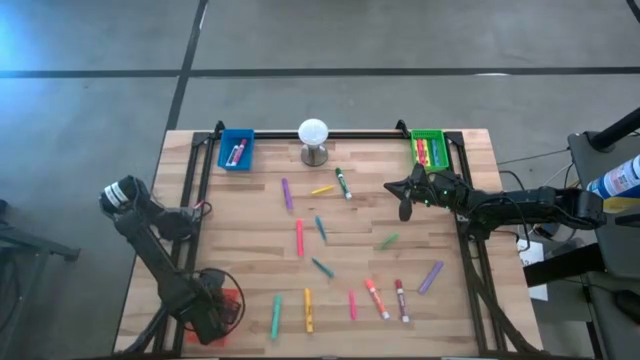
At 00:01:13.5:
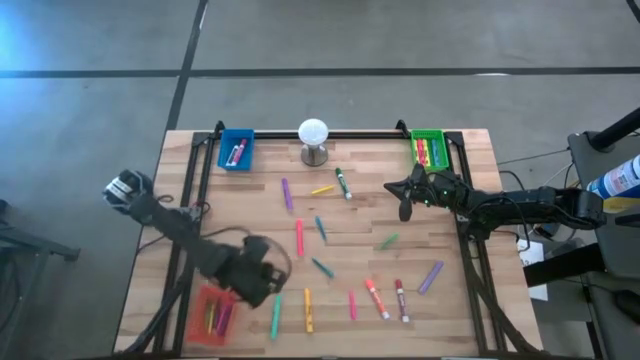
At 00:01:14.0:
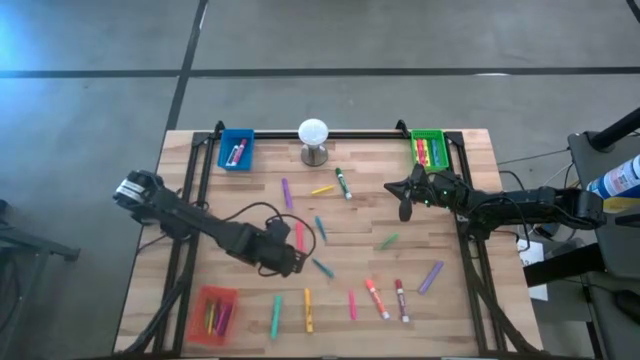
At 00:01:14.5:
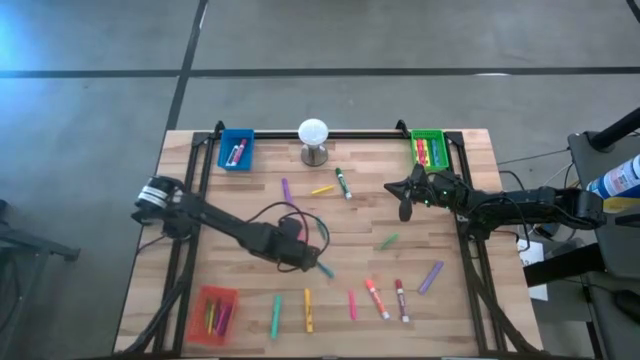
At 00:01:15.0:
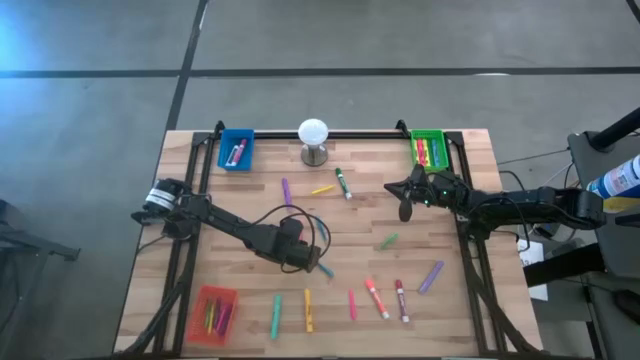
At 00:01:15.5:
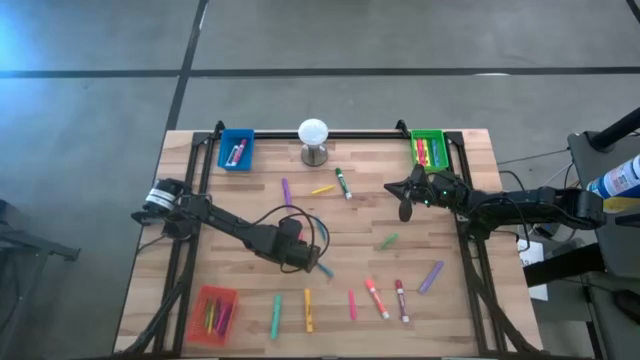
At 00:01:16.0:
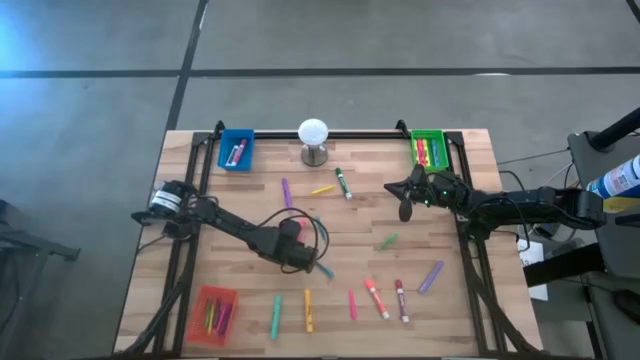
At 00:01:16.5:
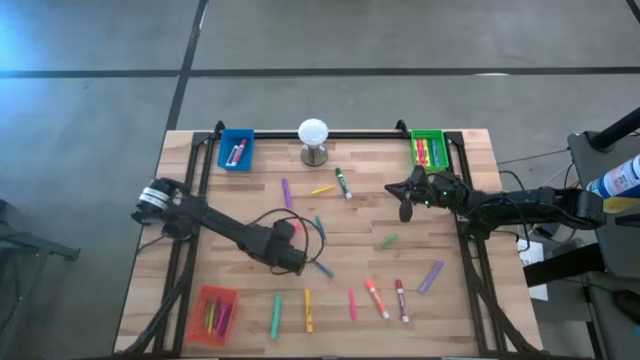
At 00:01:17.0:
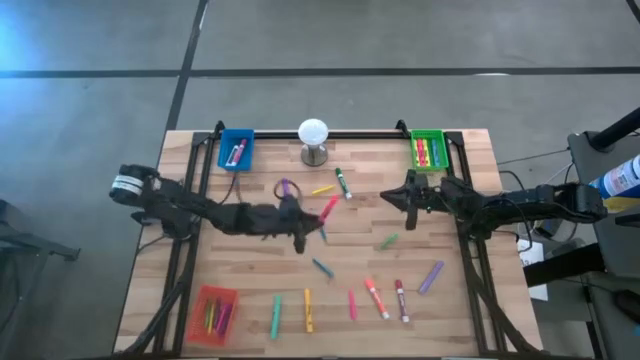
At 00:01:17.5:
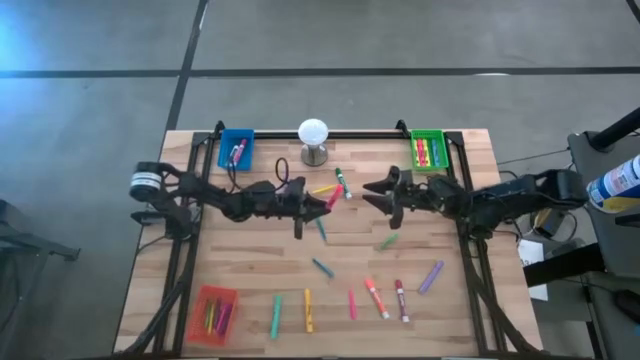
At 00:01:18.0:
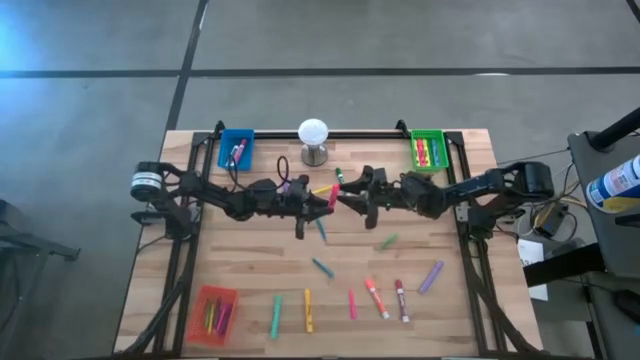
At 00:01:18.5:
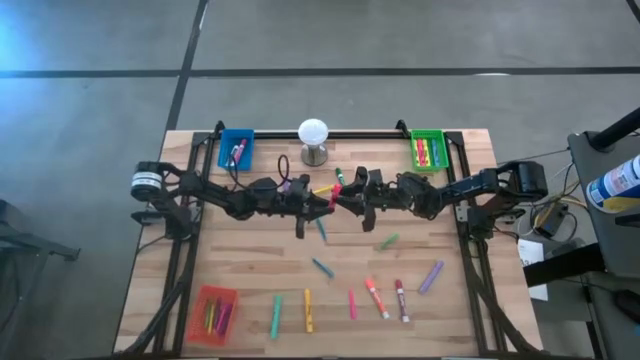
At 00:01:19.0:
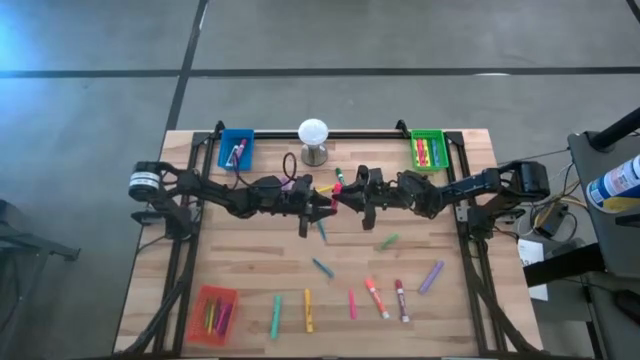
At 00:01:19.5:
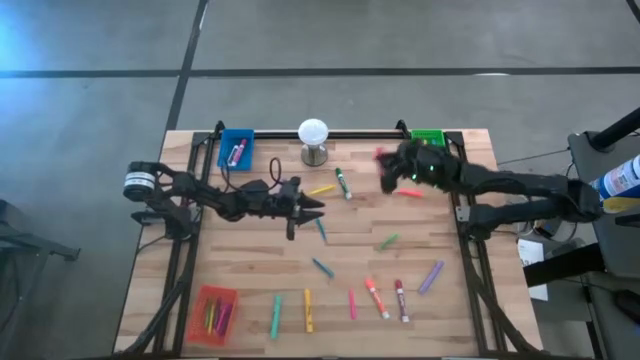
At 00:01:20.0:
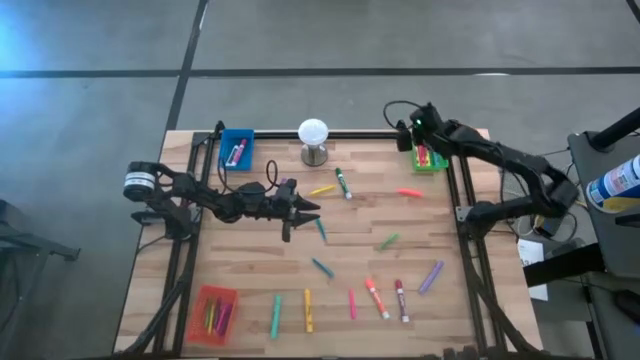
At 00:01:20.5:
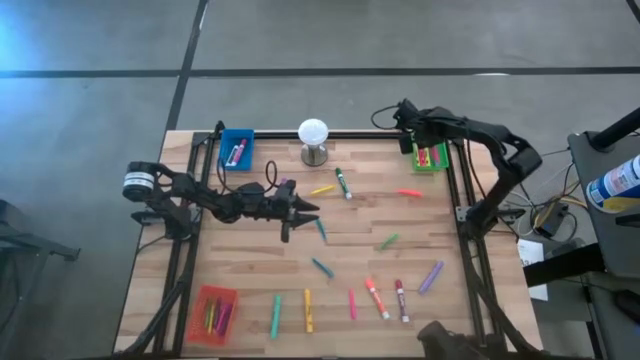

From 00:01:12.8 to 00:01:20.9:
Task: Pick & Place Markers
Put the pink highlighter pen into the green bin

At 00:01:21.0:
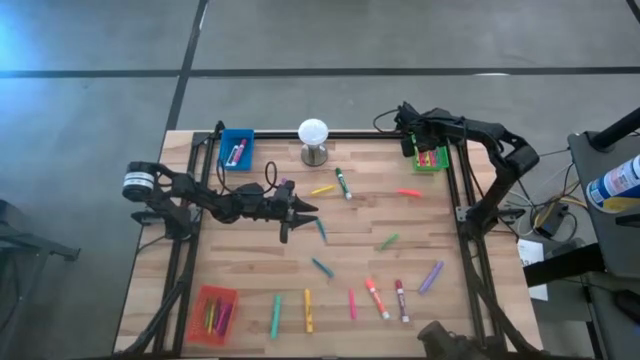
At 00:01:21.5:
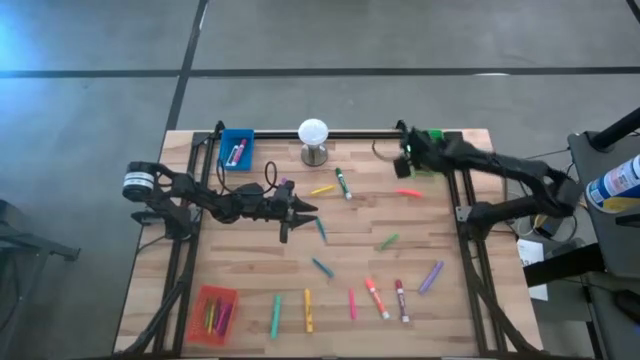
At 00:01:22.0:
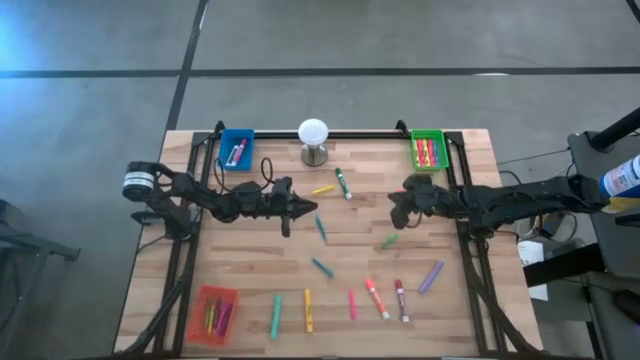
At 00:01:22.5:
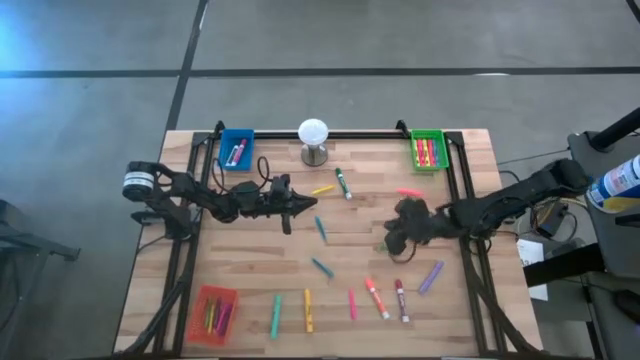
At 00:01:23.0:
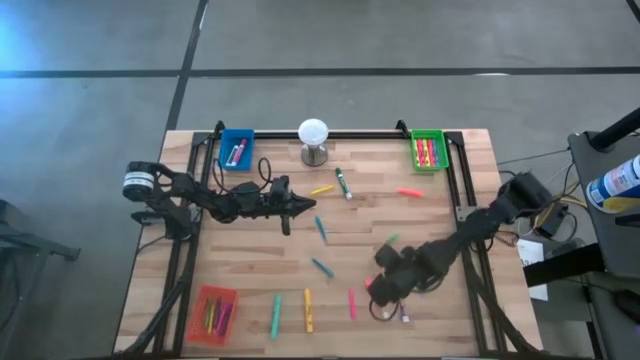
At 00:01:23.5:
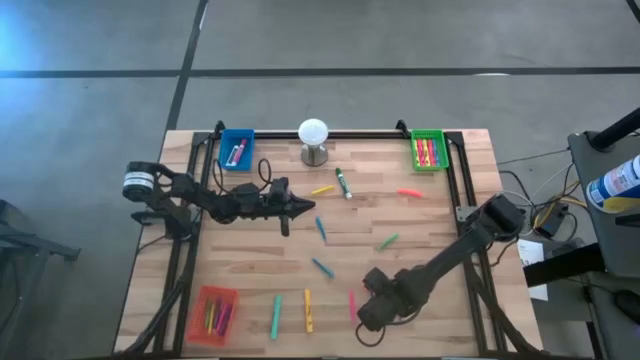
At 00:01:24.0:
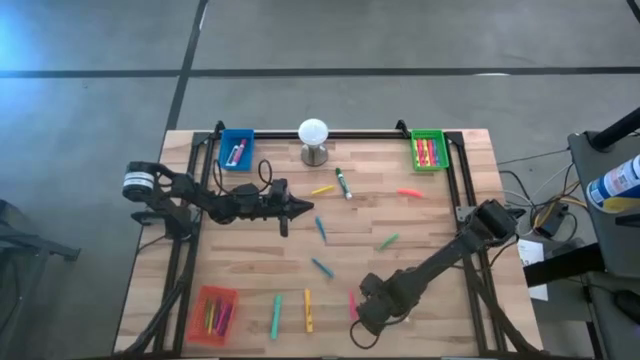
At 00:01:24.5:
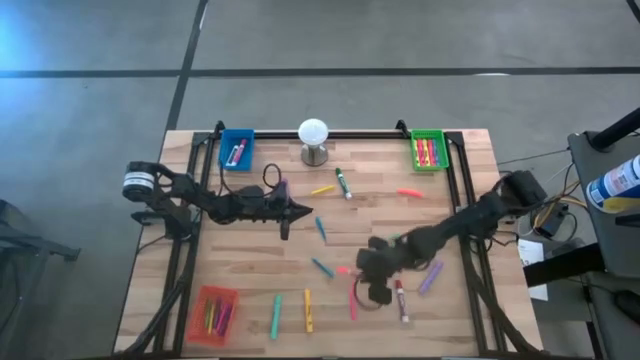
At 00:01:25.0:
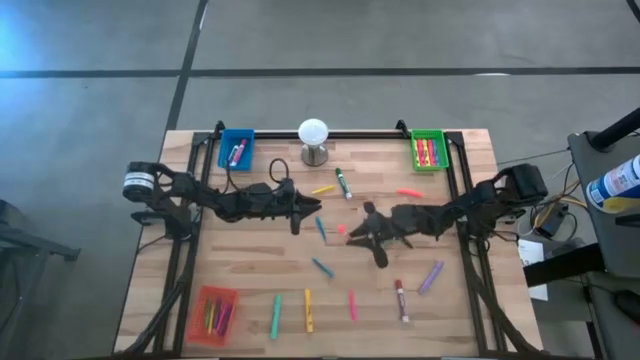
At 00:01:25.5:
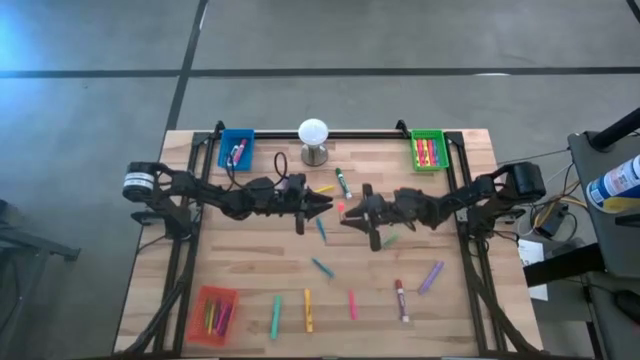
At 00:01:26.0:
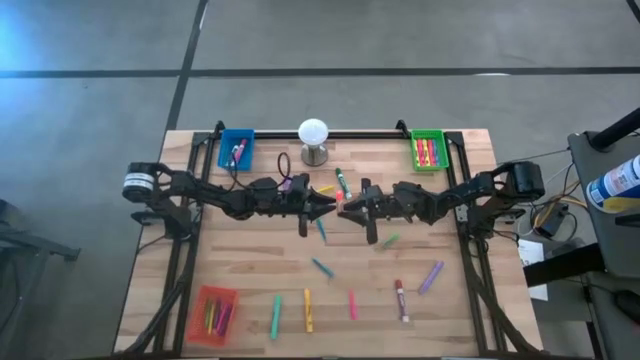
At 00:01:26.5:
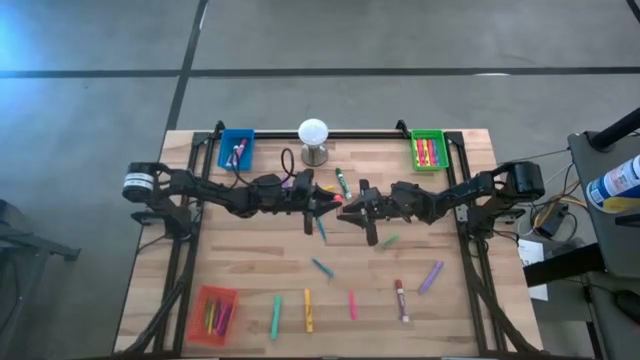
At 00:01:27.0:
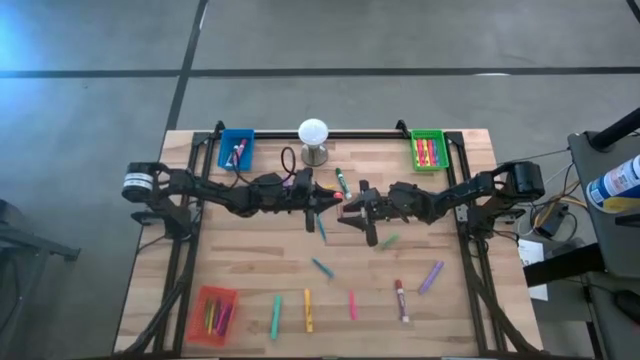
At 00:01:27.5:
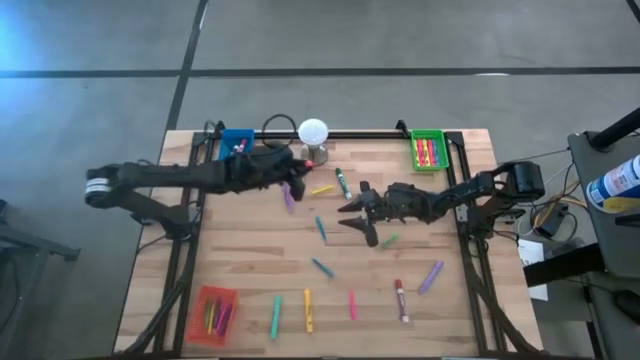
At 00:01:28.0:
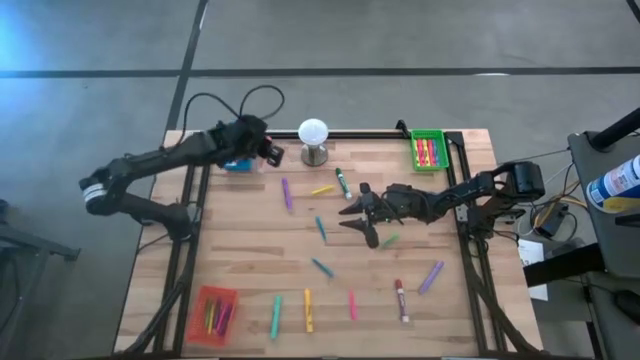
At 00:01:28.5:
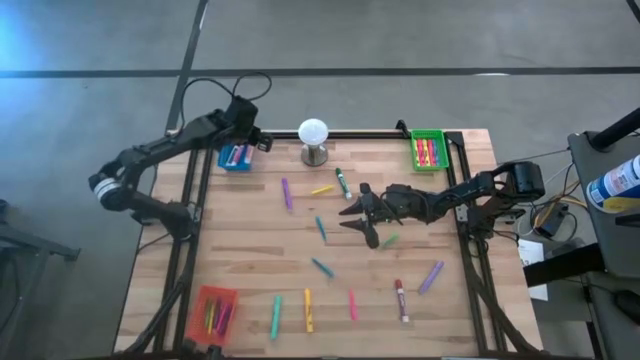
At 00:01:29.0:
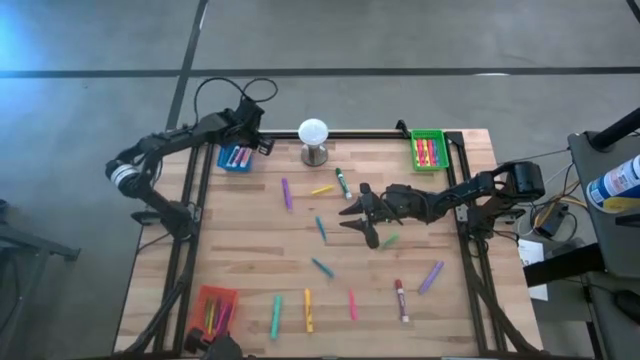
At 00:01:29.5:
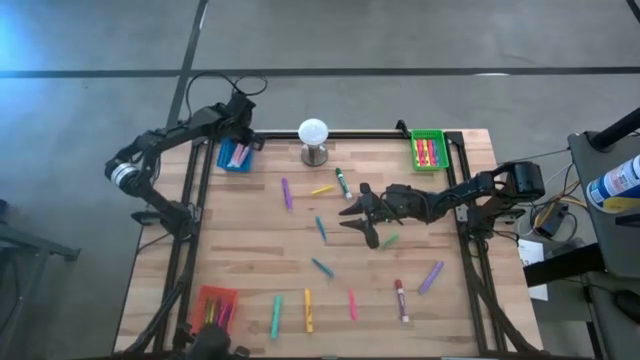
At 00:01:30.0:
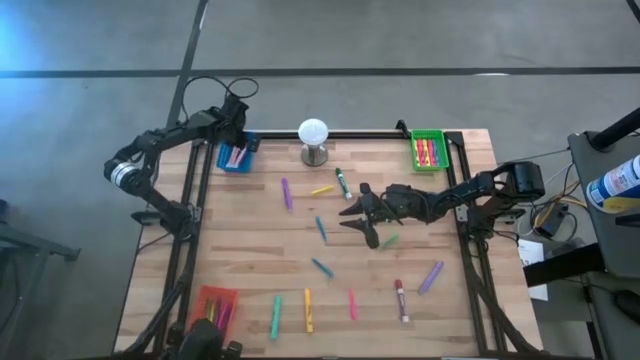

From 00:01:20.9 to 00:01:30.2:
Put the orange marker pen into the blue bin

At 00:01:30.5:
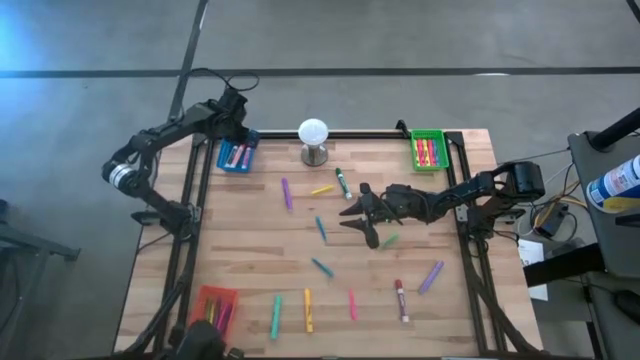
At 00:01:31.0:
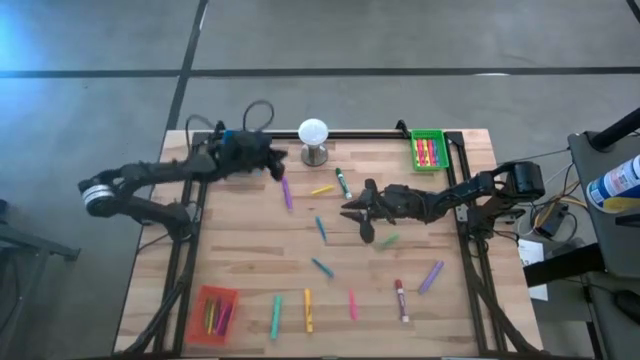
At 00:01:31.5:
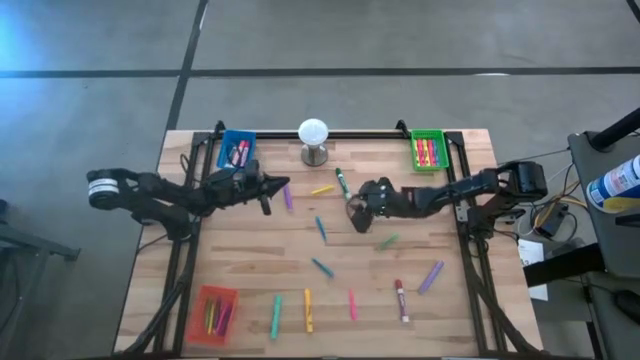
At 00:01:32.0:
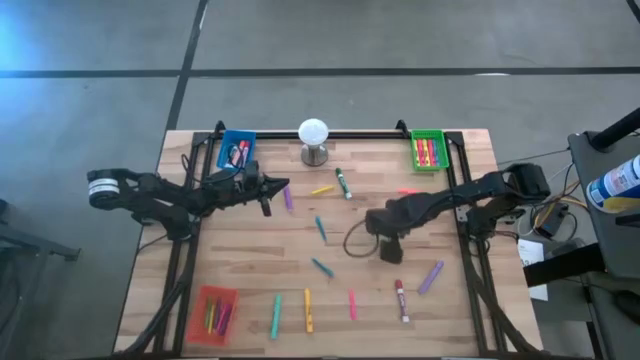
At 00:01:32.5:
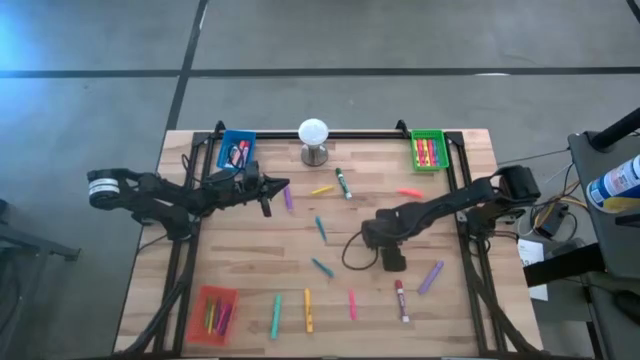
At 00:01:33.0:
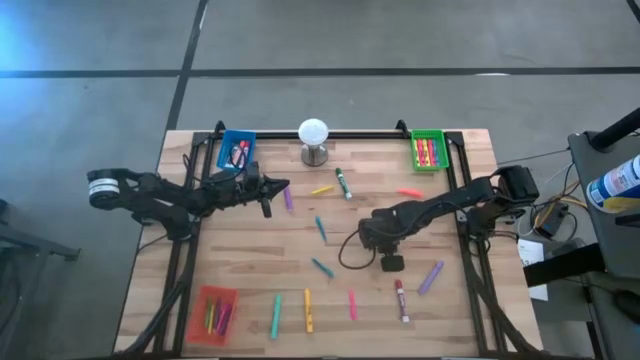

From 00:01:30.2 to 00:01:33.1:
Put the green pen into the orange bin
